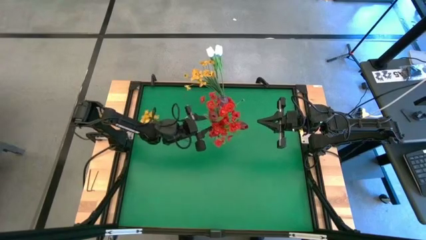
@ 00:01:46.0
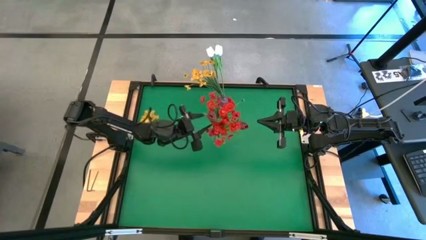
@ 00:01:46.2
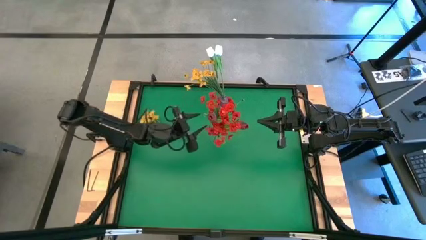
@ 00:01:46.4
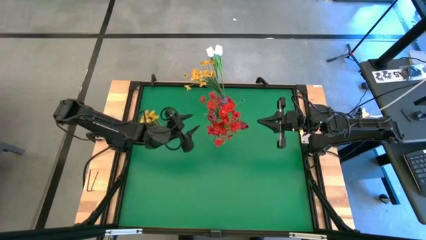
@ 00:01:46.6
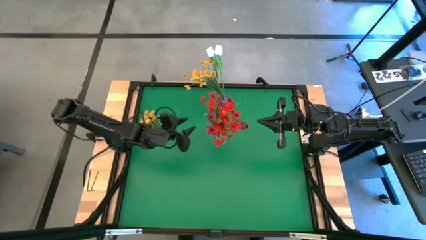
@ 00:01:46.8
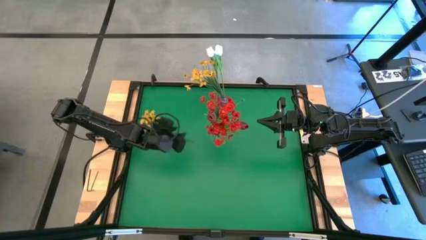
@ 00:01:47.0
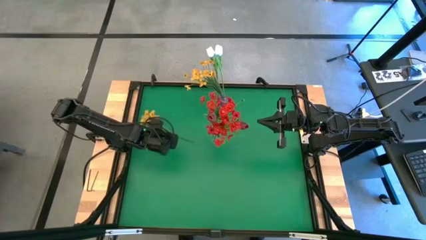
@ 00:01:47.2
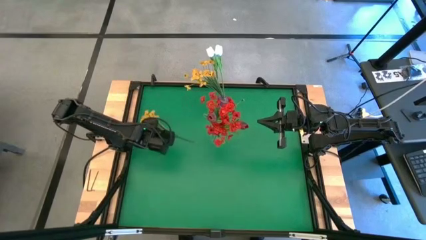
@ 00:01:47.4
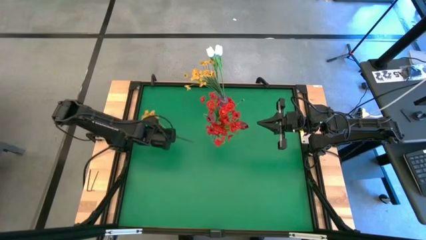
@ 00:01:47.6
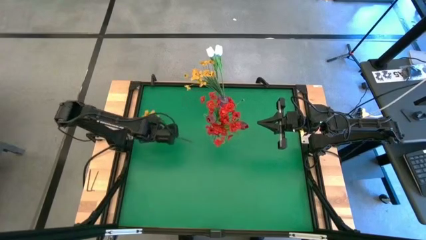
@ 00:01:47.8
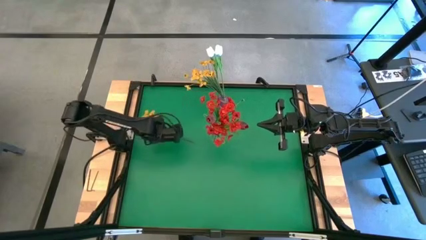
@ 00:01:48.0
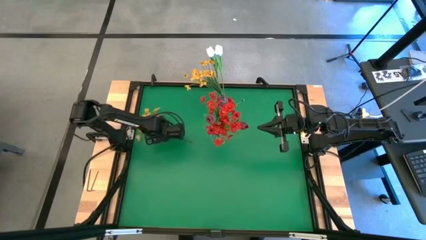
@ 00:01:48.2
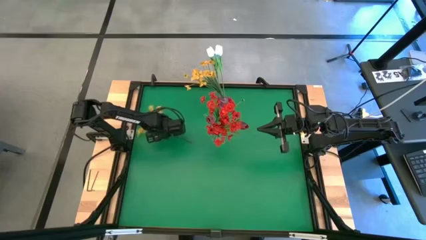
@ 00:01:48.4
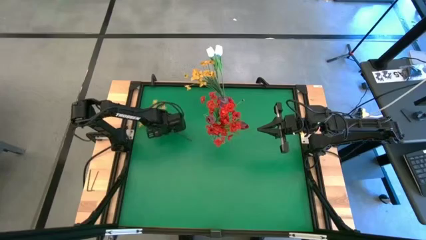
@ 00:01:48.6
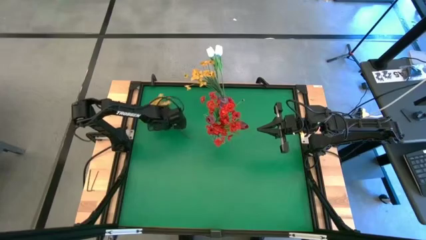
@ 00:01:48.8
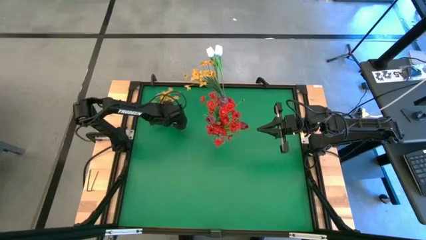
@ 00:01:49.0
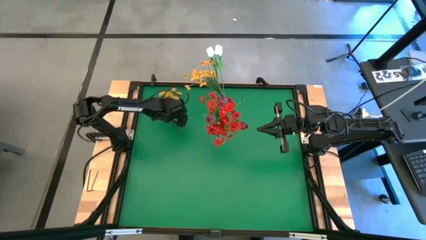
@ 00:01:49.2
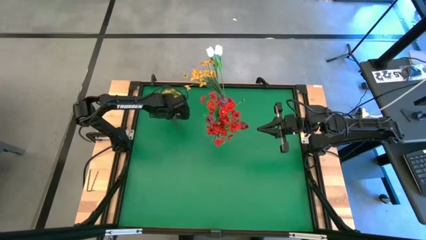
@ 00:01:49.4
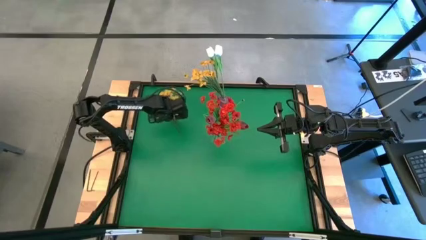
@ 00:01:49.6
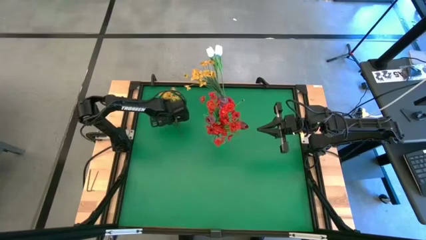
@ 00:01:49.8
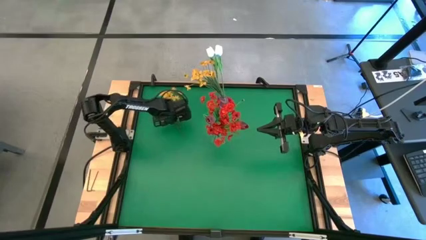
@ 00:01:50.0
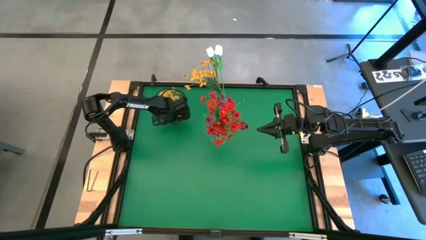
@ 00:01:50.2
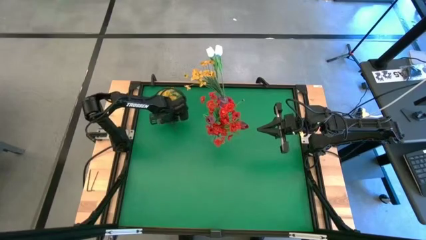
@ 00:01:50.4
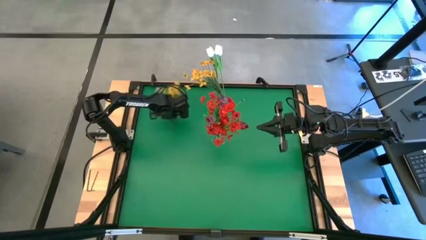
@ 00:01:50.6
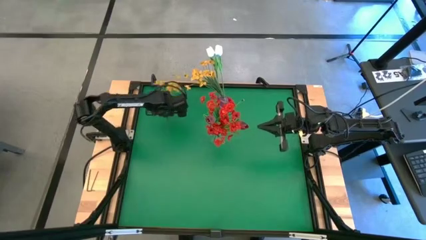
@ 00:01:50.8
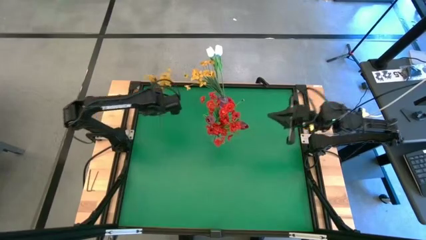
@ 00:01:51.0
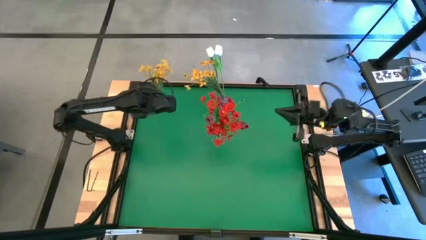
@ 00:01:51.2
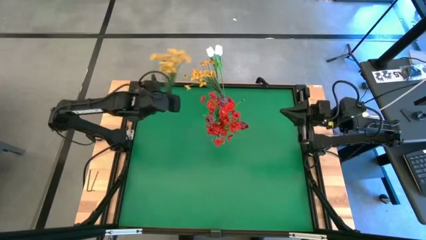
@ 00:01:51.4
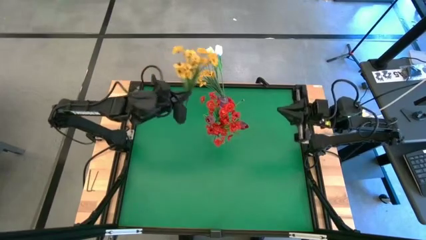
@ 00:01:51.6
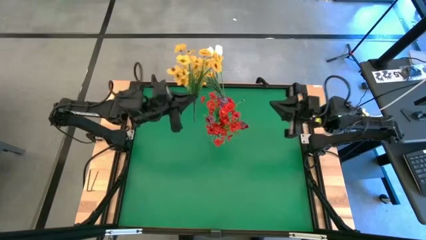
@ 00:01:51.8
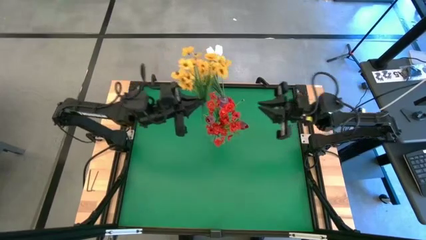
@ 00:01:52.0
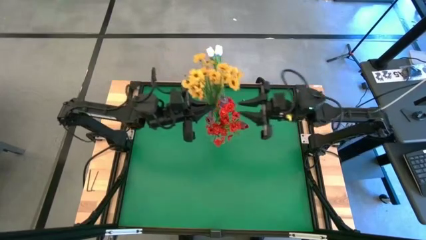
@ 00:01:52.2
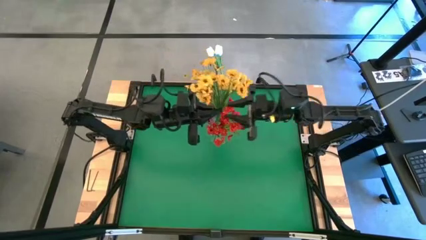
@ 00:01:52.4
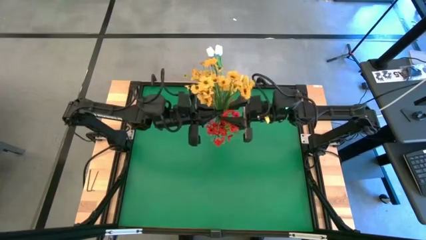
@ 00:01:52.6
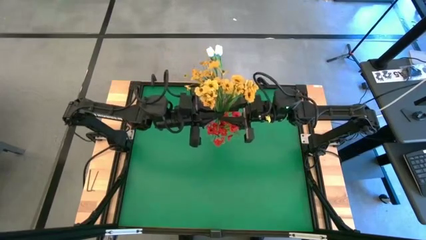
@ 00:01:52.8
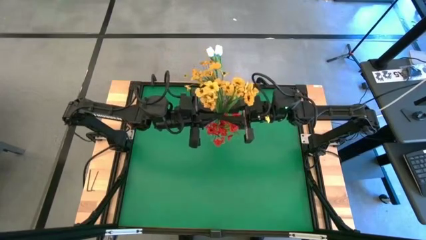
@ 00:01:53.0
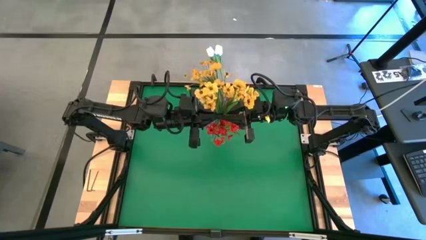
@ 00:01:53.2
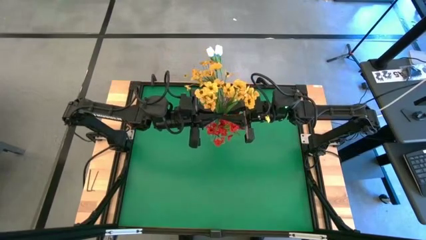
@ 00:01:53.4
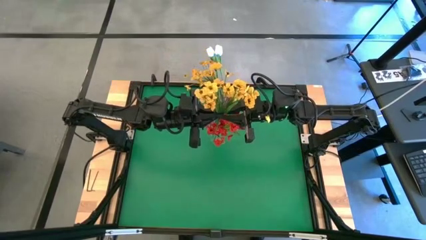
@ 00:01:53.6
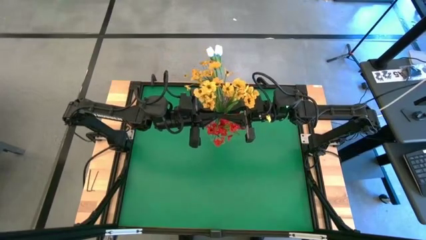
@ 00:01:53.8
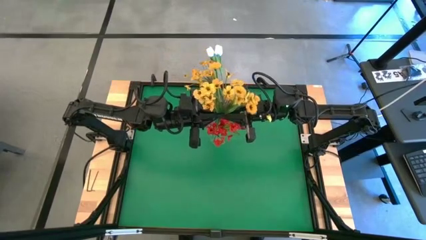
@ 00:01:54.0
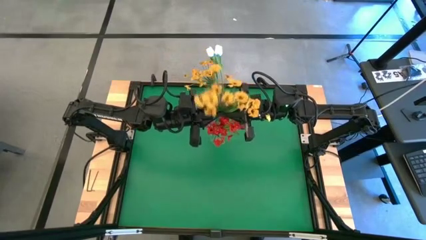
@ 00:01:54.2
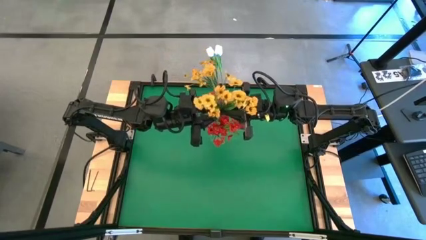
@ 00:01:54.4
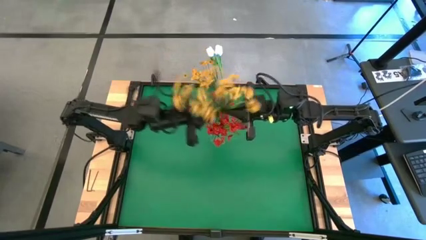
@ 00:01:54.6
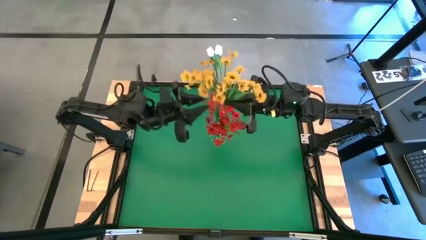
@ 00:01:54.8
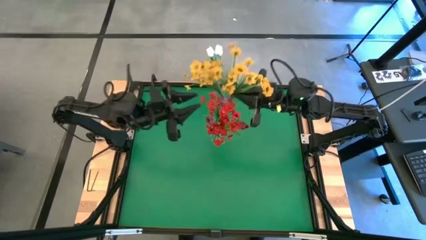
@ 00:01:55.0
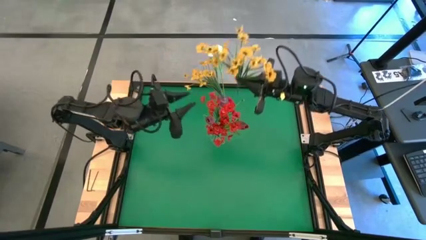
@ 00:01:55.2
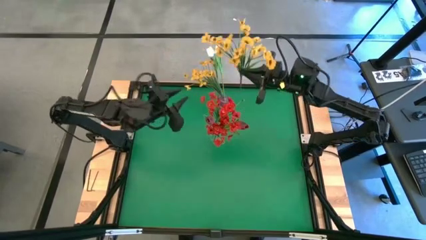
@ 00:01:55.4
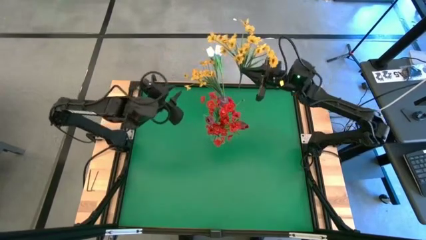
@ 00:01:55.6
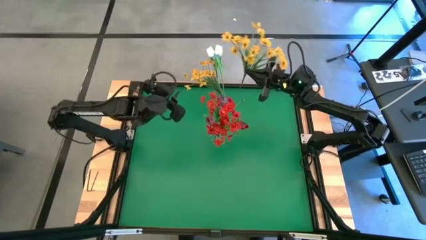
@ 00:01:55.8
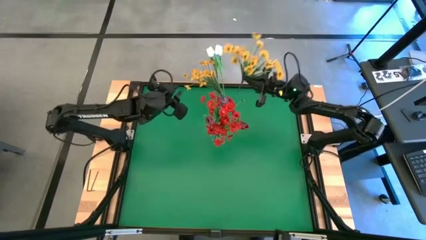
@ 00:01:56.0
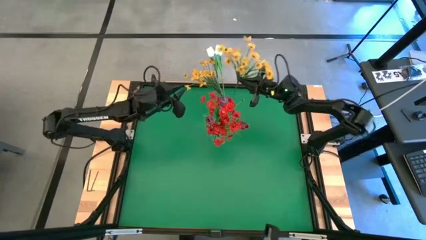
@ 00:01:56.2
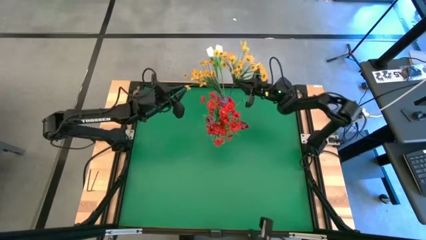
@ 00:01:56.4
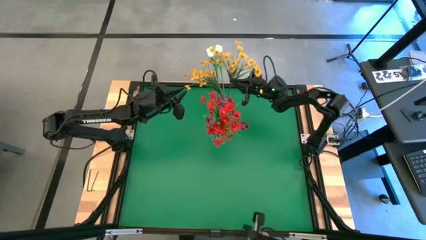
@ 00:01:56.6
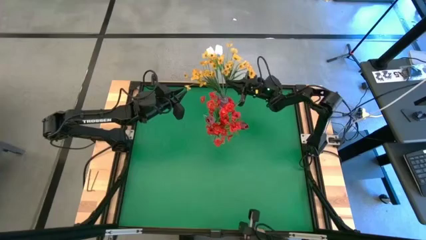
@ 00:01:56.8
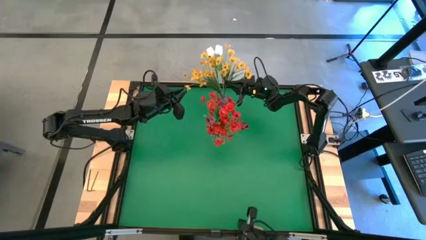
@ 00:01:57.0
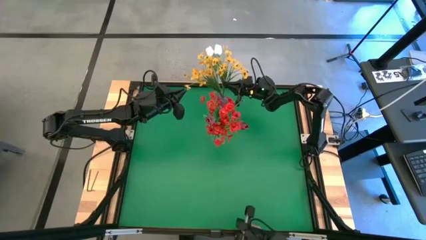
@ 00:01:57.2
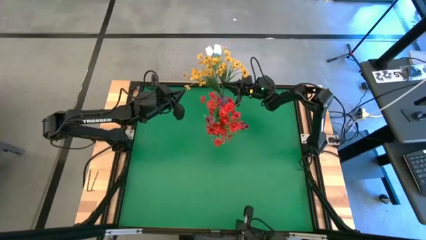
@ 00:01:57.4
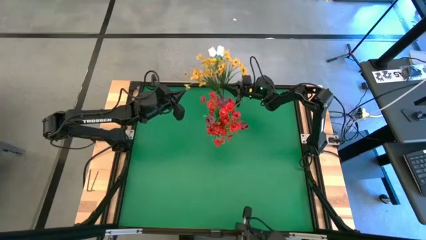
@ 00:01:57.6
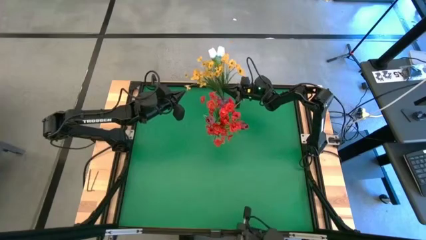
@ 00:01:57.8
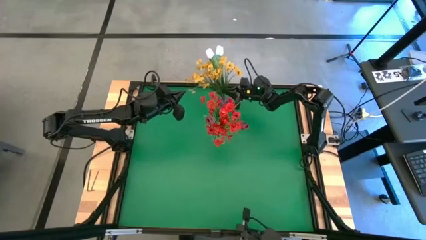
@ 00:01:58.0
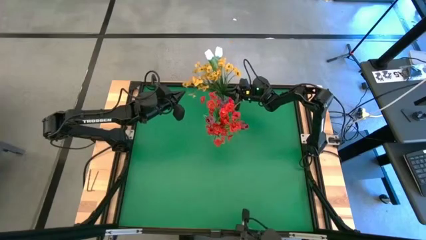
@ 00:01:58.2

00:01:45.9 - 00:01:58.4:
Task: Sort flowers into vase by color
Put the yellow flower into the purple vase

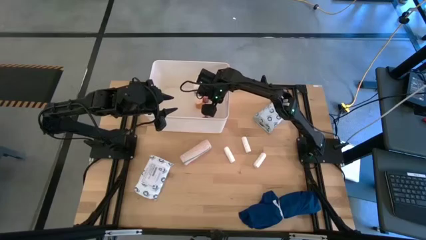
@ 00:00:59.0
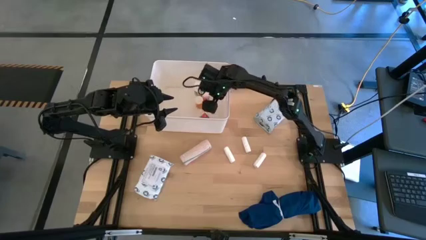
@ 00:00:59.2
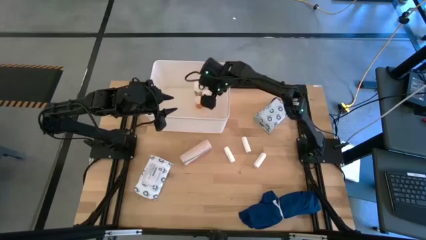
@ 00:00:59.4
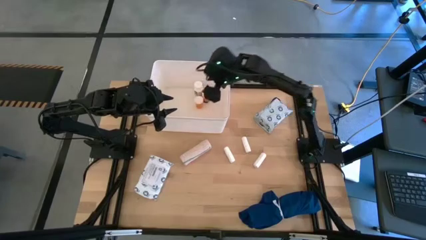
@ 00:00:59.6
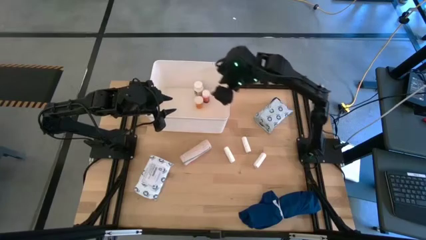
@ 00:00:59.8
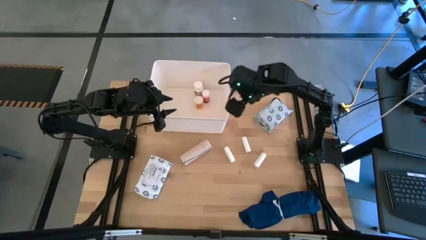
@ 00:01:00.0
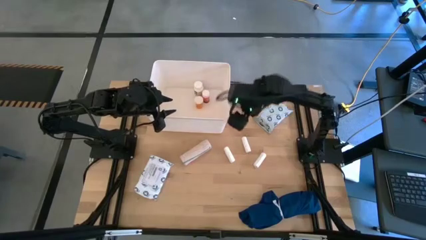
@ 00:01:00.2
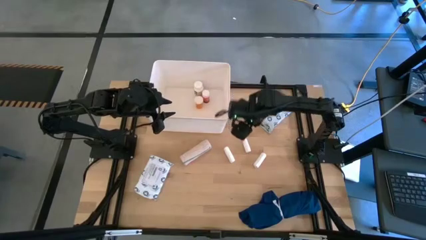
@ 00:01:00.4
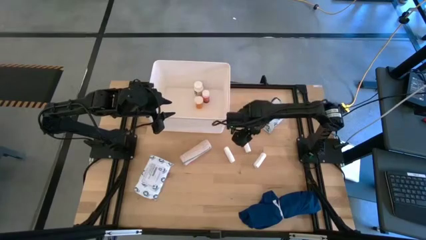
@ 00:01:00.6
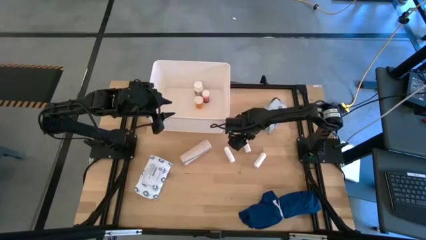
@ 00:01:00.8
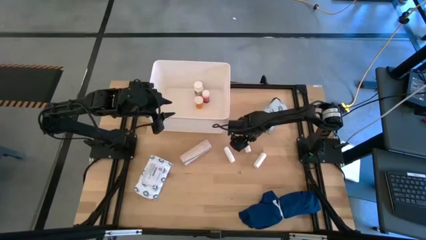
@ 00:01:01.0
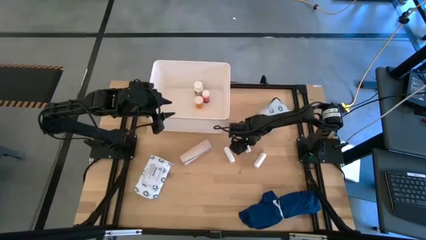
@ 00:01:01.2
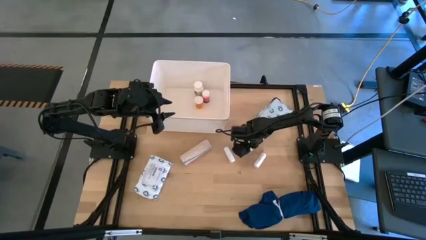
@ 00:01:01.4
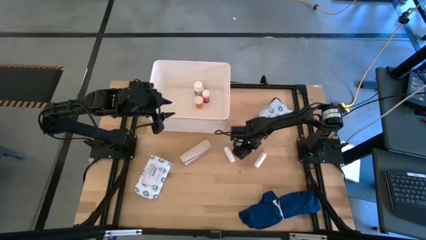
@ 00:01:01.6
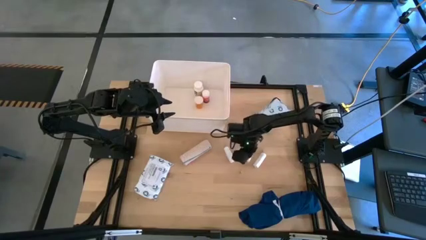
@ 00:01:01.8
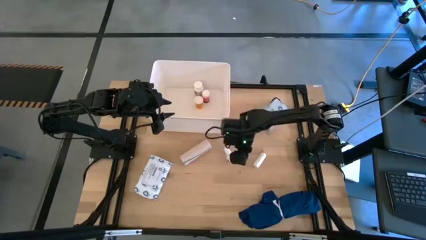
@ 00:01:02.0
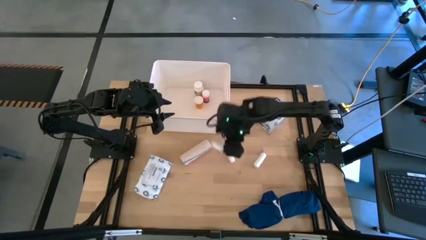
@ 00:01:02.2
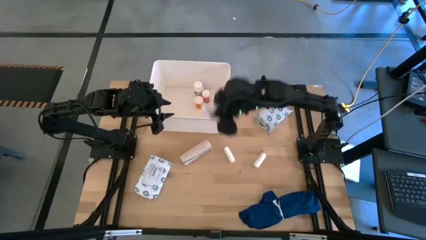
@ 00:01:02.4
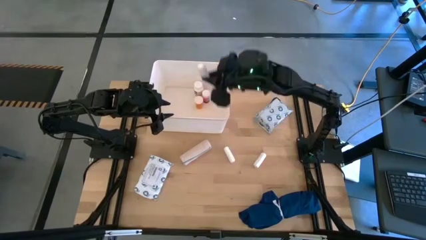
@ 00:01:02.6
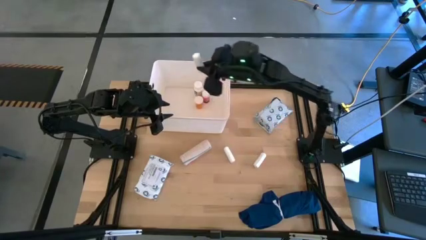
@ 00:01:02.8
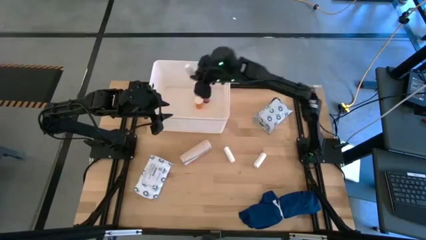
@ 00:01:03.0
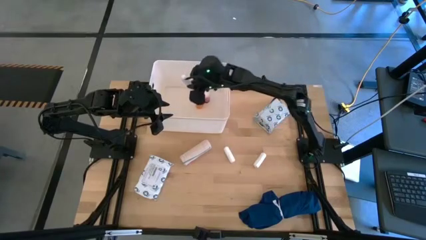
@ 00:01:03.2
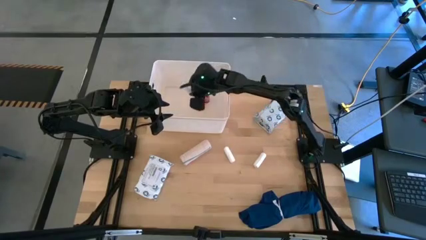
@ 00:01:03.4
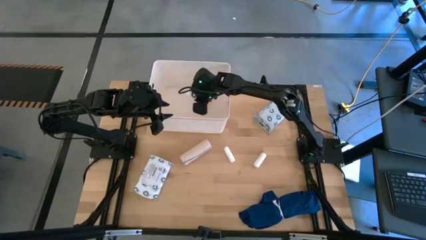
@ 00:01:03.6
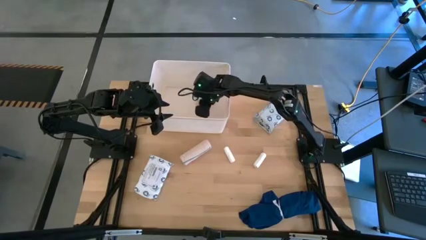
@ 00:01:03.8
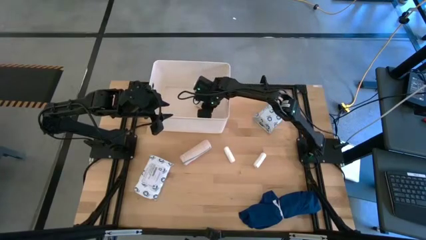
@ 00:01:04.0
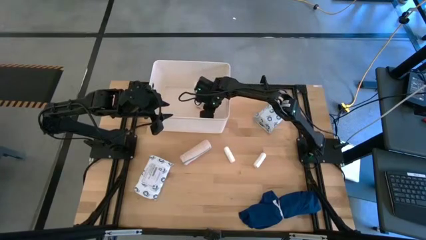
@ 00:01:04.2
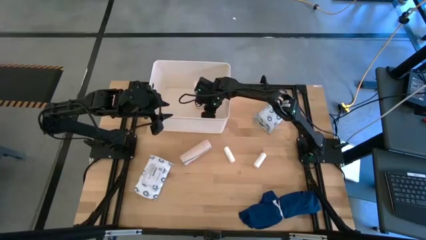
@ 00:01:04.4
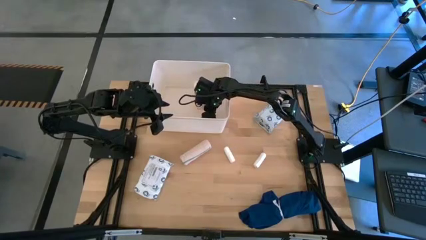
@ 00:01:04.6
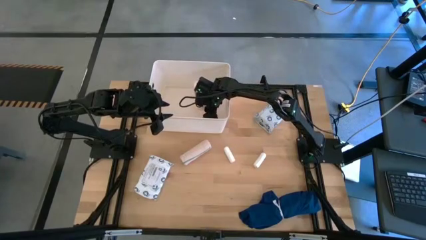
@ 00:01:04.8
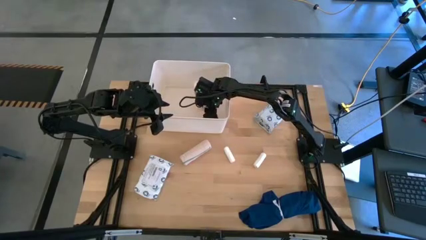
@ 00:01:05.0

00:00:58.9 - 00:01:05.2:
Task: Pick & place medical supplies in basket/bin
Put the top rolled gauze into the white bin
